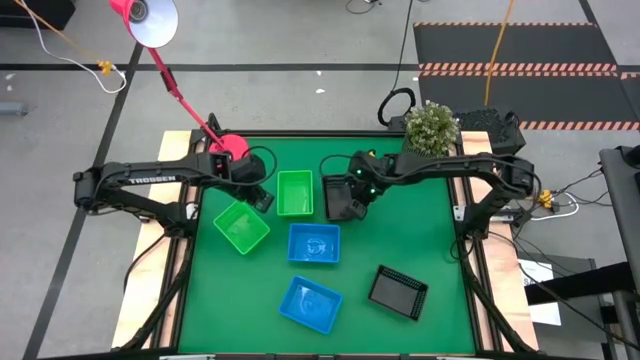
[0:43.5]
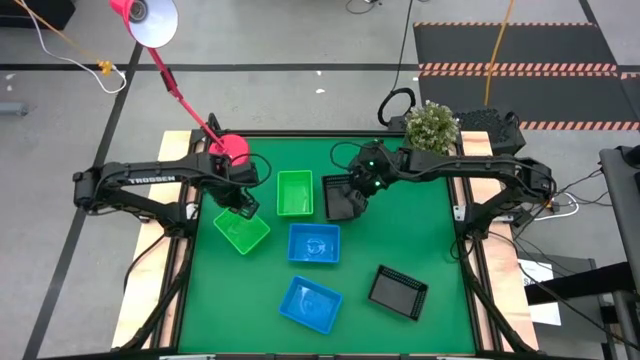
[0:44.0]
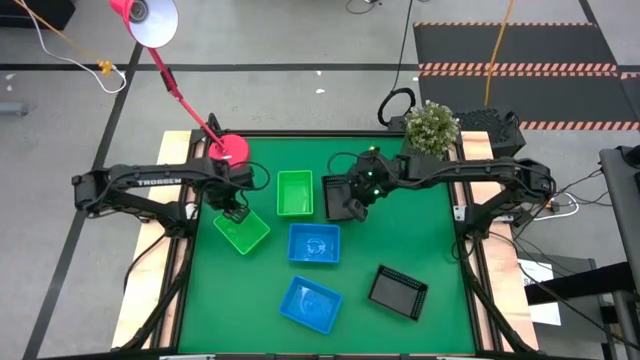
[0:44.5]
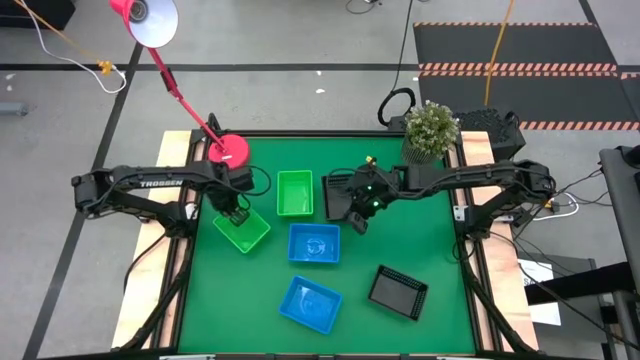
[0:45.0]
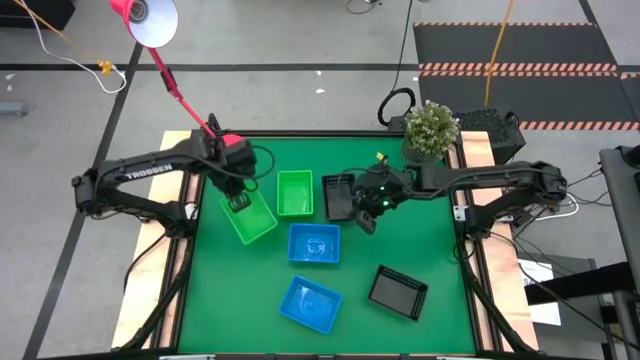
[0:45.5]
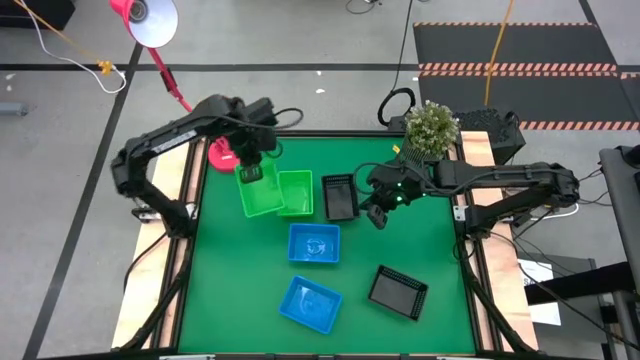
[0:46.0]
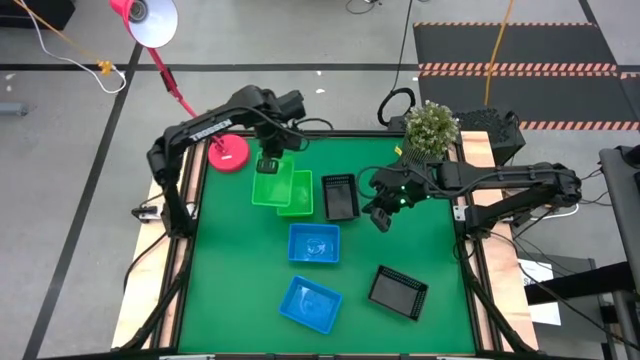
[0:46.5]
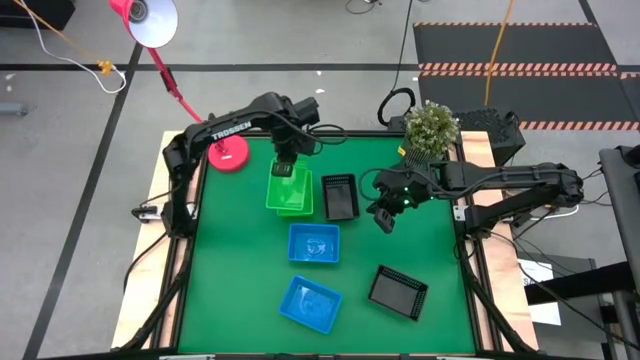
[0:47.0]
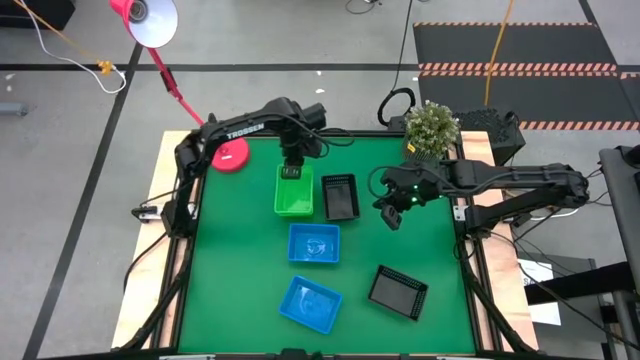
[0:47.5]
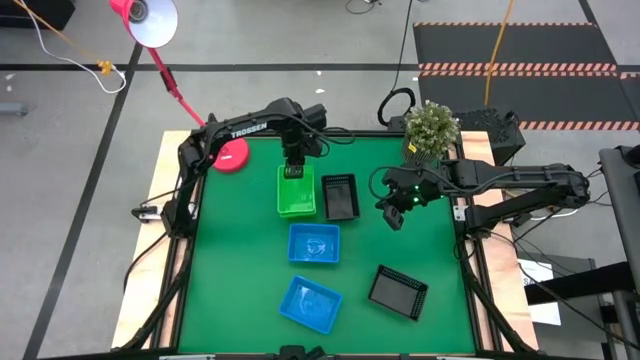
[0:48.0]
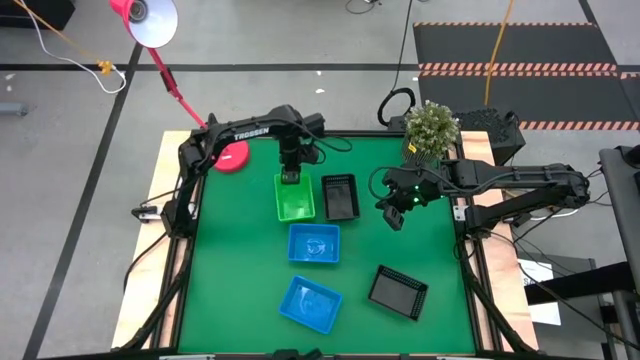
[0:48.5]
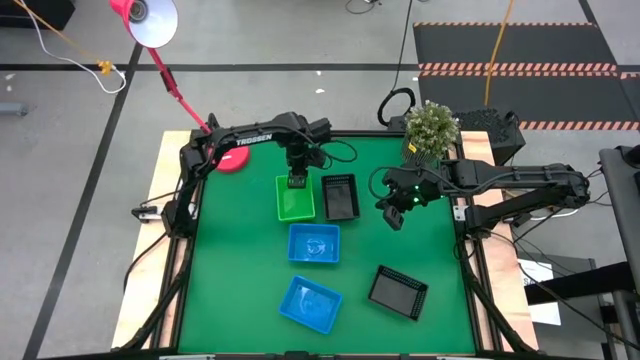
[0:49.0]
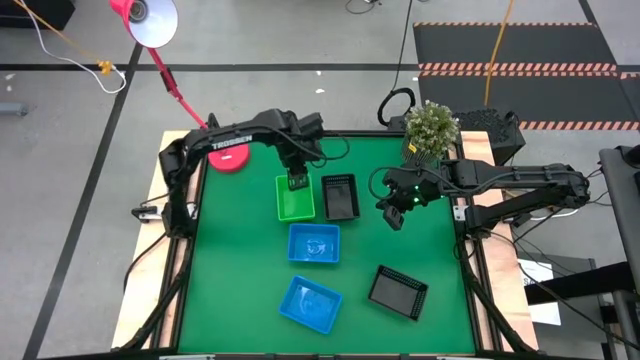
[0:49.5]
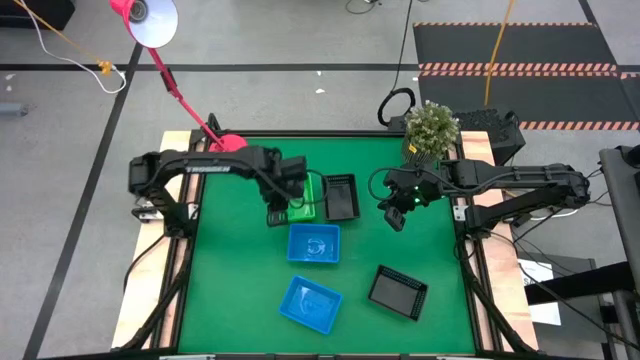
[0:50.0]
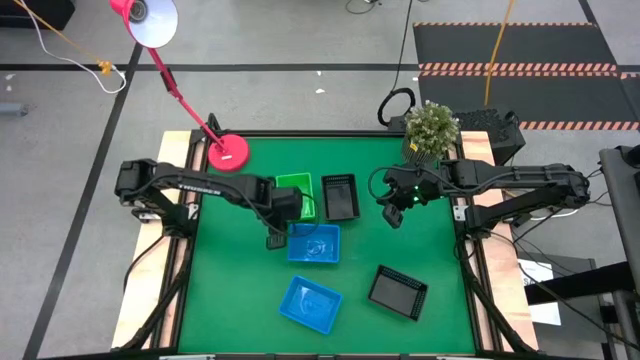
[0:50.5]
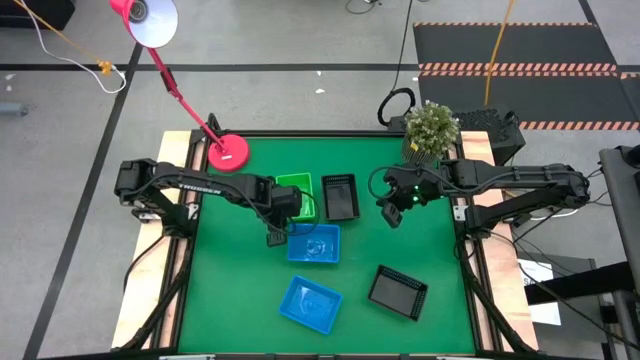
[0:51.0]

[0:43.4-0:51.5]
Stack the bottom green bin on top of the top green bin

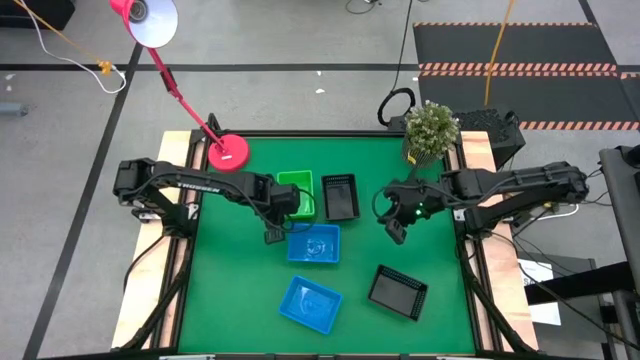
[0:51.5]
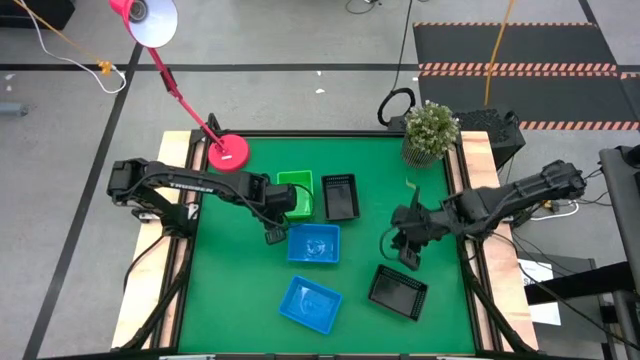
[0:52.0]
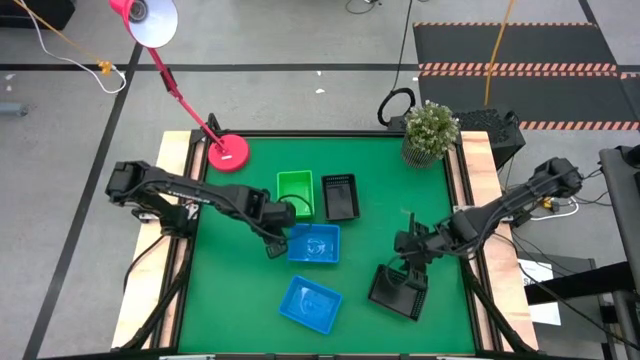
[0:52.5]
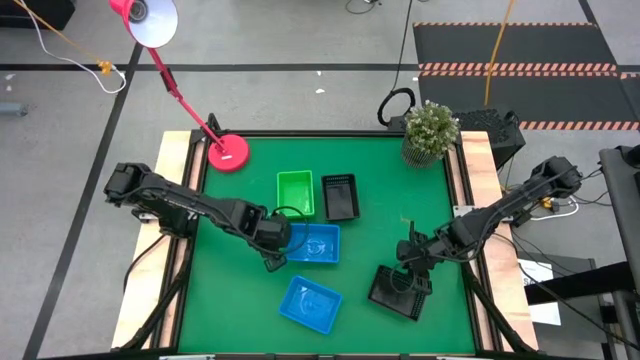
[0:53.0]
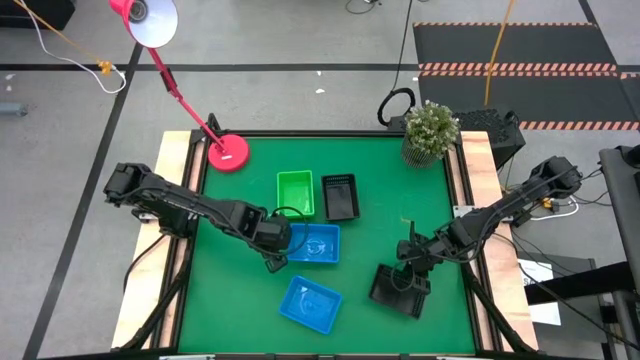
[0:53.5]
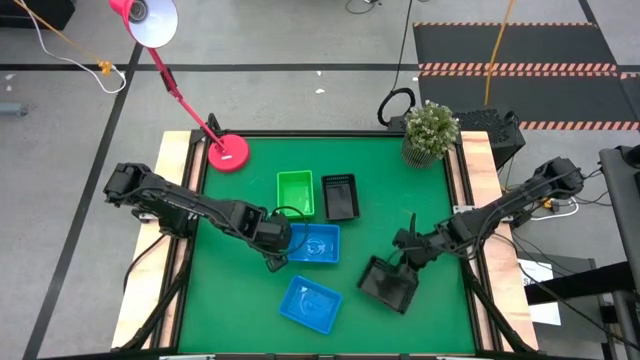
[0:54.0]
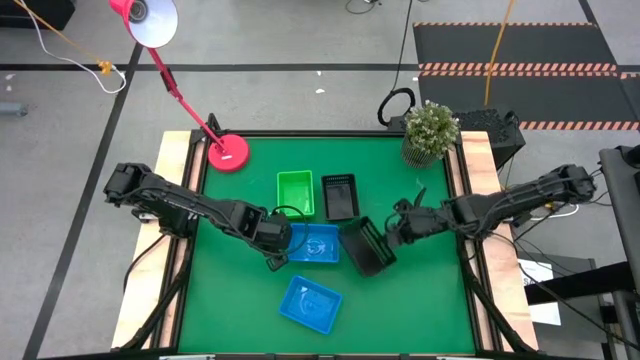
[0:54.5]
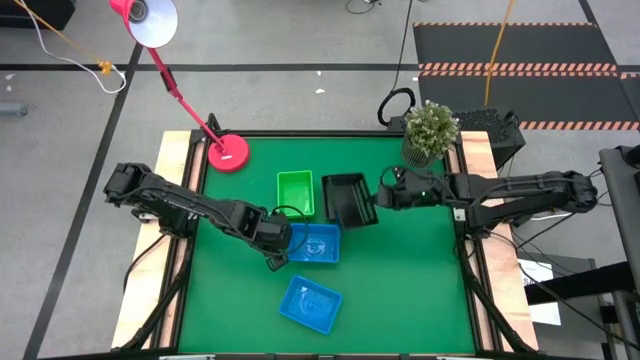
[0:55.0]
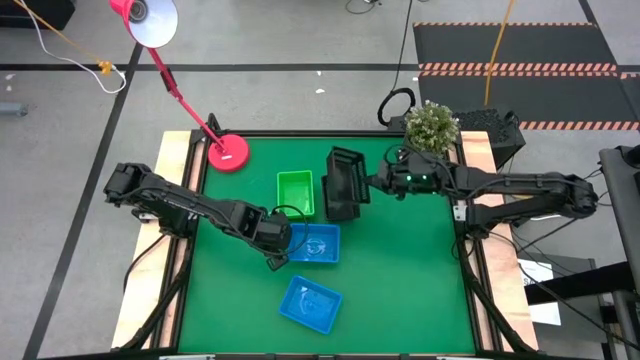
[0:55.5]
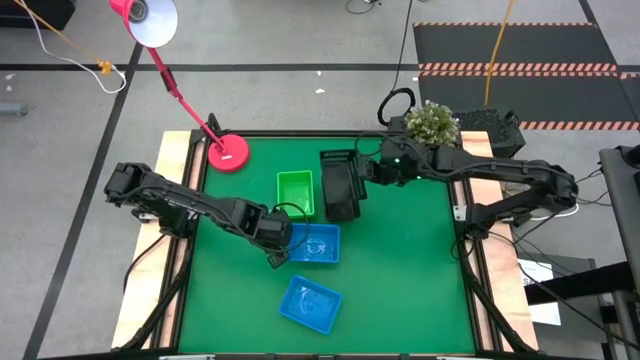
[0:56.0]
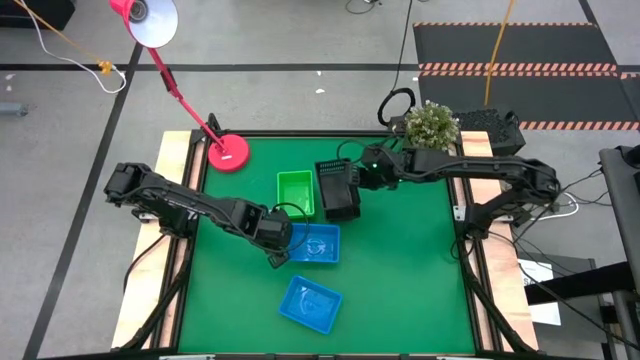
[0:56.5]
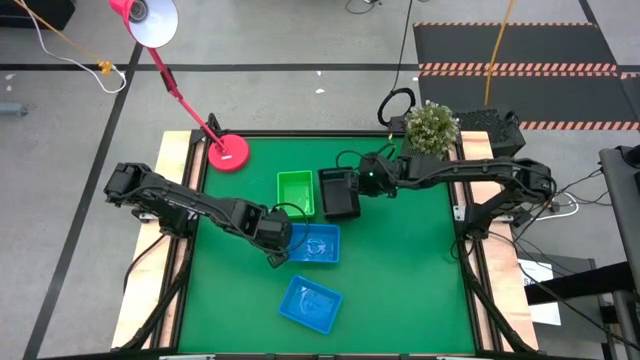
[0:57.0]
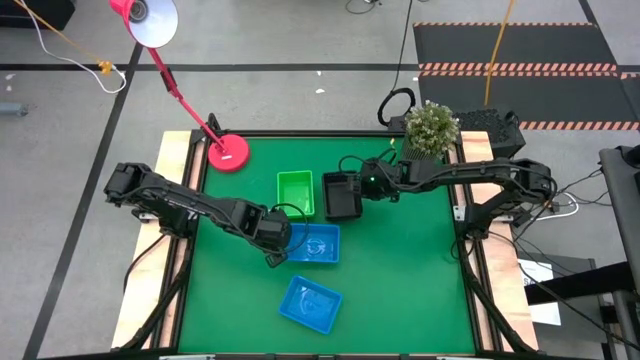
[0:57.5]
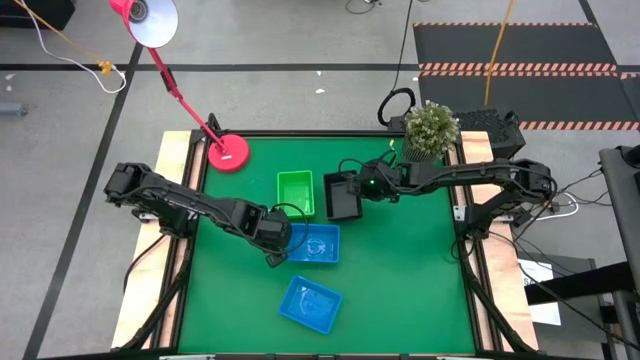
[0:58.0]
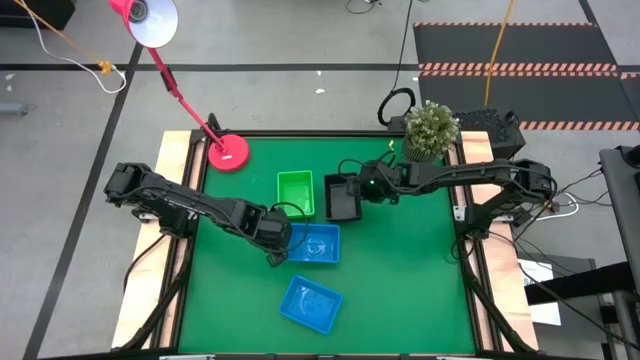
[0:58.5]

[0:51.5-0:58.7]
Stack the bottom black bin on top of the top black bin

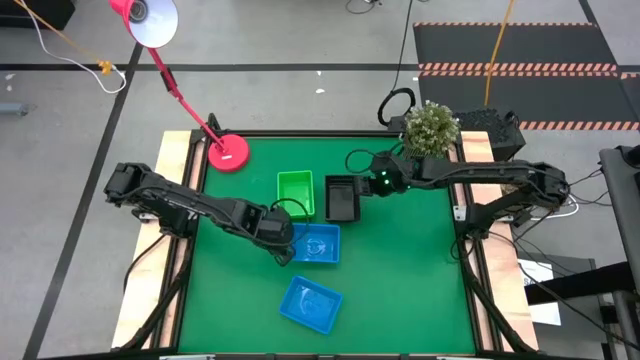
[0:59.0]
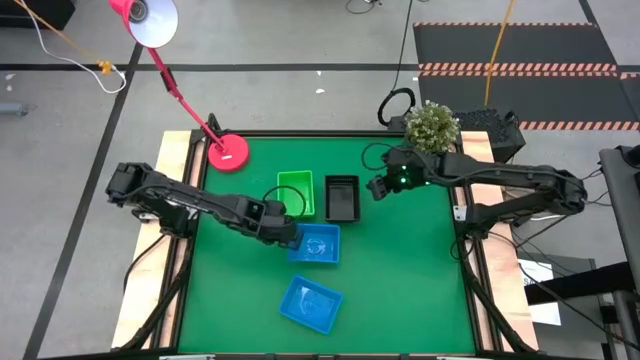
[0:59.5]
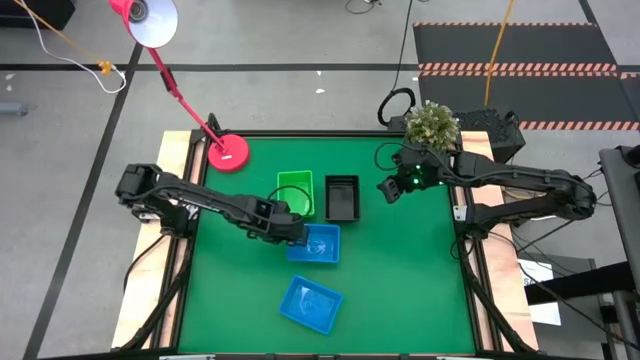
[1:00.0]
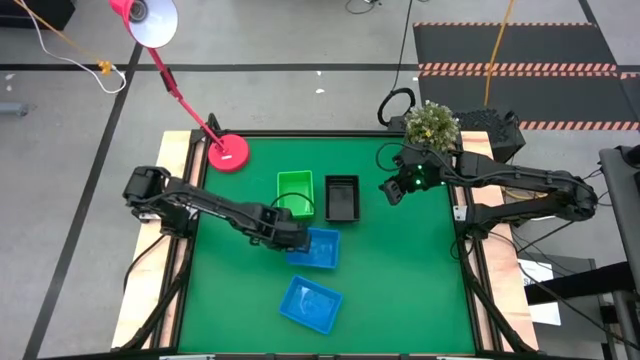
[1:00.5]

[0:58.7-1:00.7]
Adjust the stacked blue bin

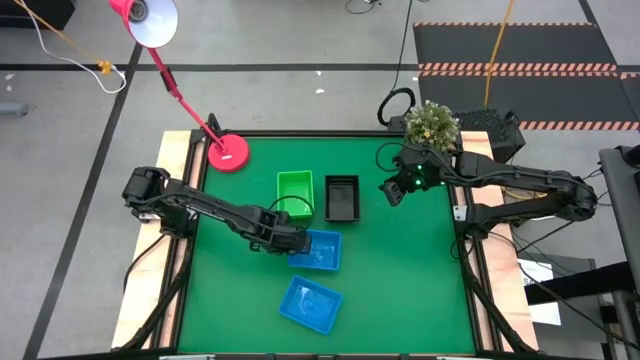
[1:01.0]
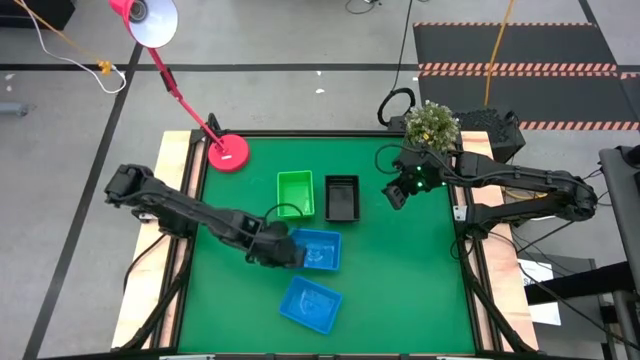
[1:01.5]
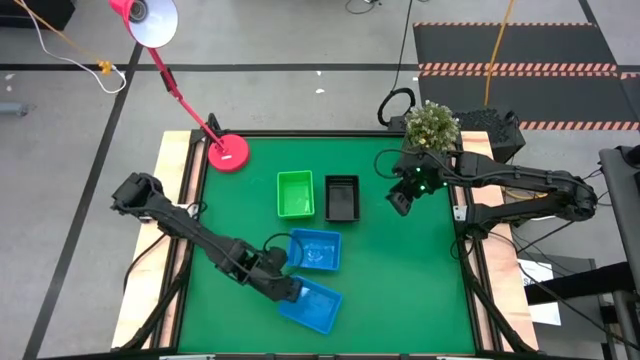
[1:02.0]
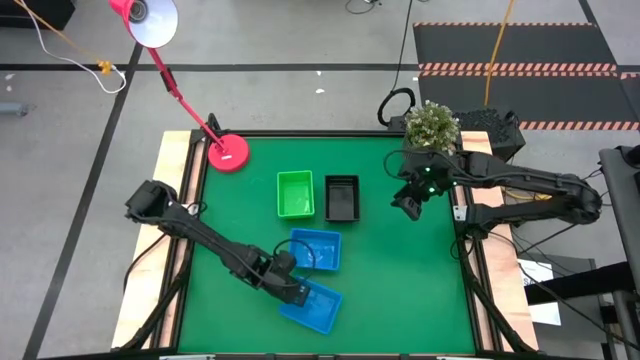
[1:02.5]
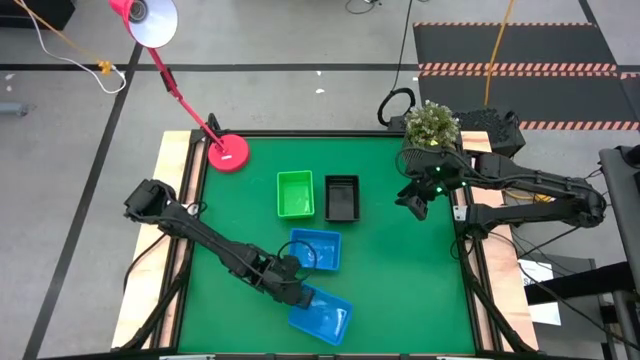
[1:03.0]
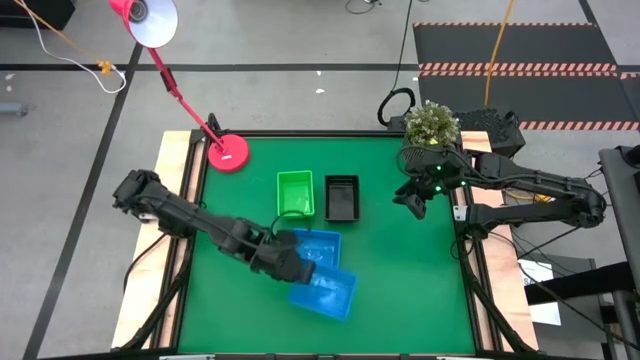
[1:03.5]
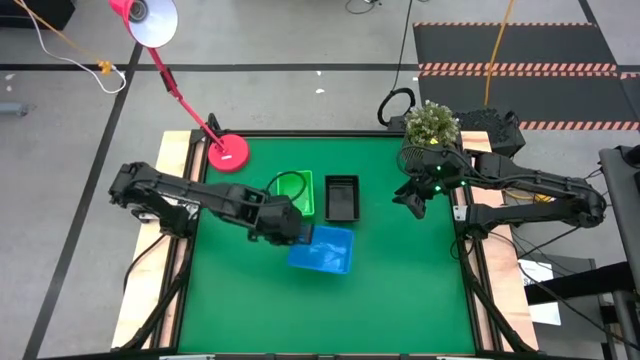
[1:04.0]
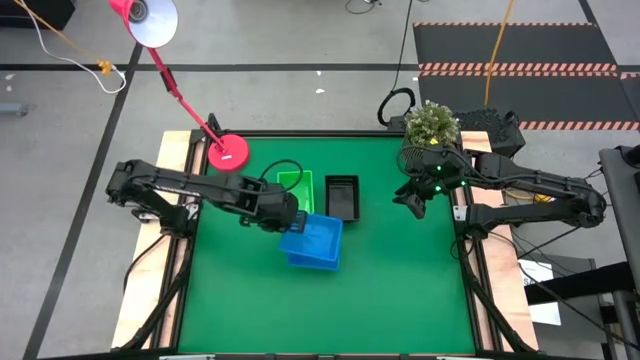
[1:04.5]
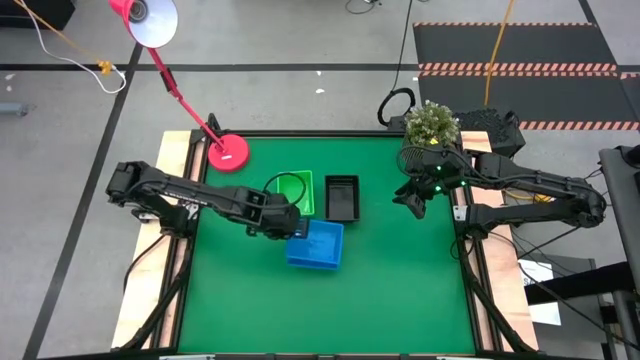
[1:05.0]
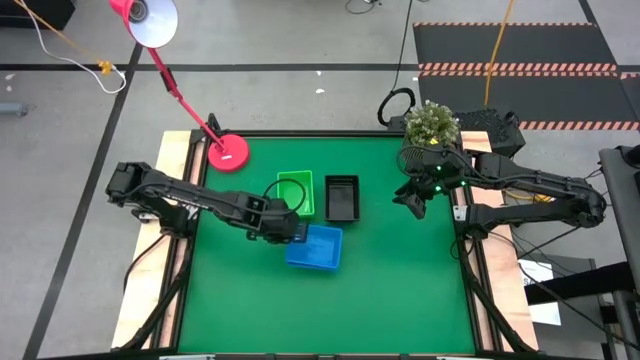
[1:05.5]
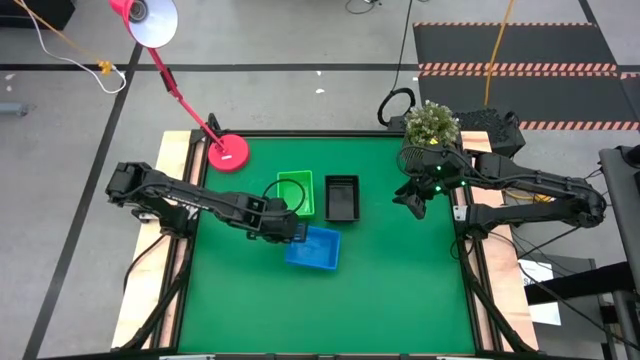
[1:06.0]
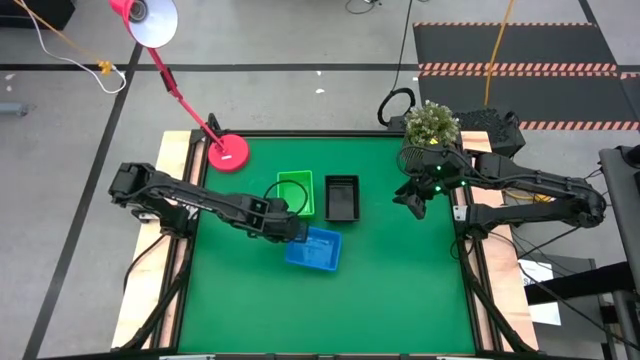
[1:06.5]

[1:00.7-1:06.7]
Stack the bottom blue bin on top of the top blue bin
